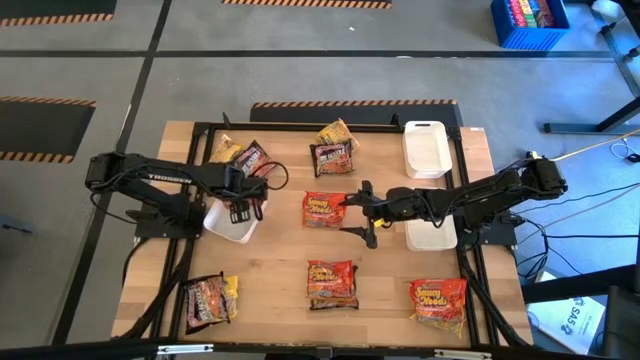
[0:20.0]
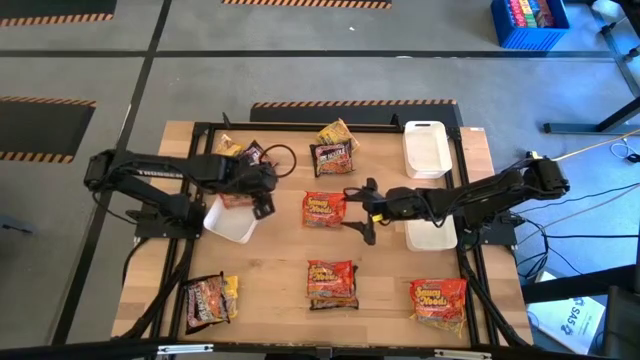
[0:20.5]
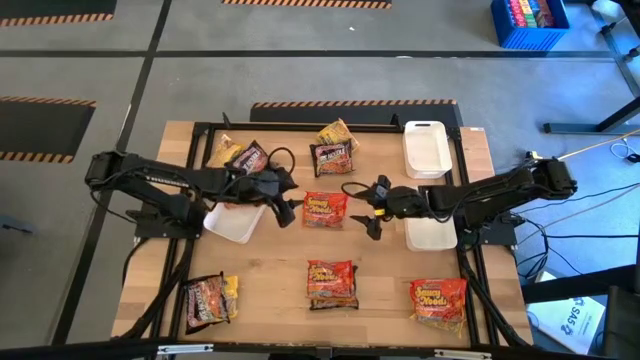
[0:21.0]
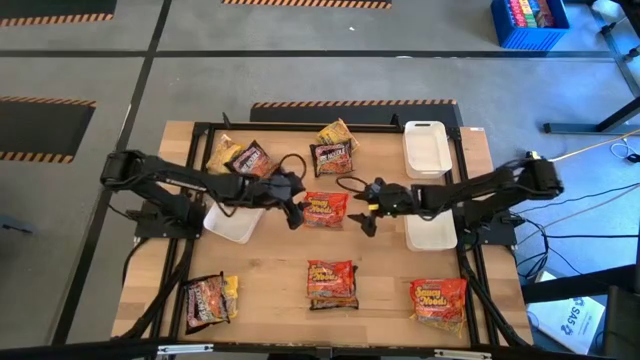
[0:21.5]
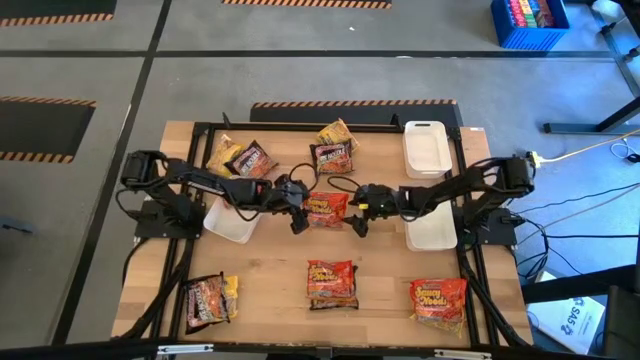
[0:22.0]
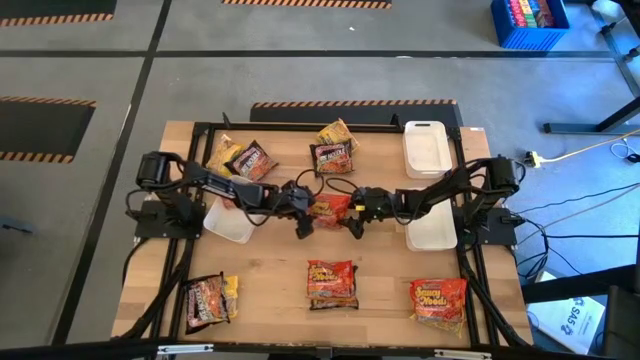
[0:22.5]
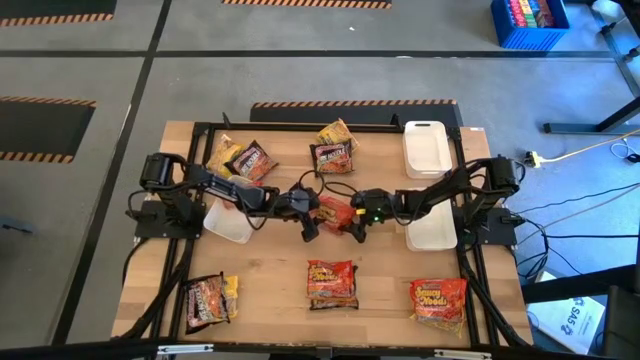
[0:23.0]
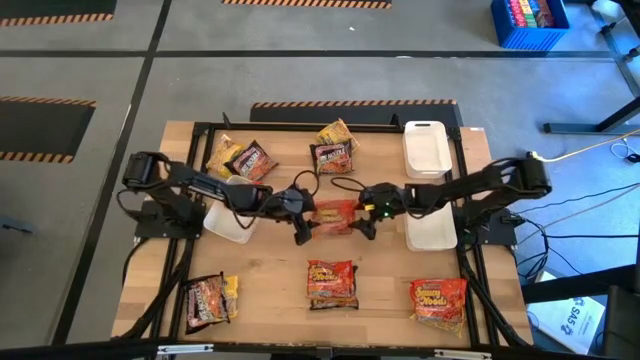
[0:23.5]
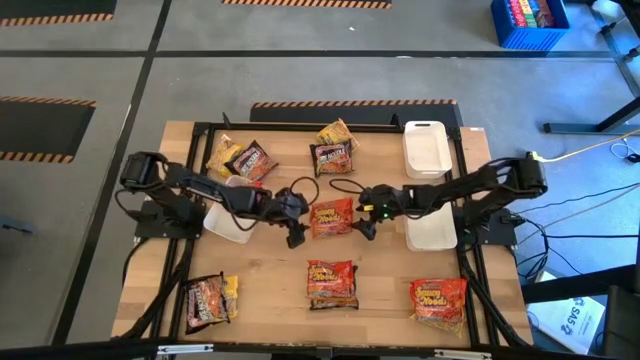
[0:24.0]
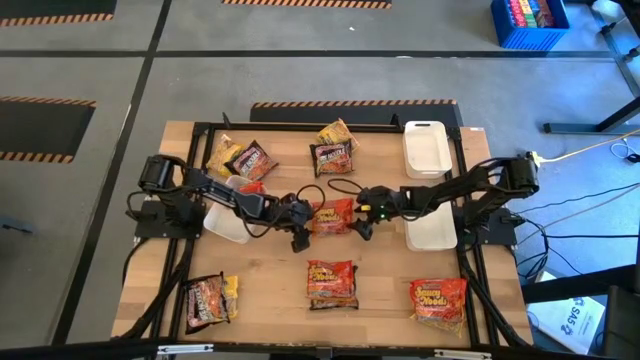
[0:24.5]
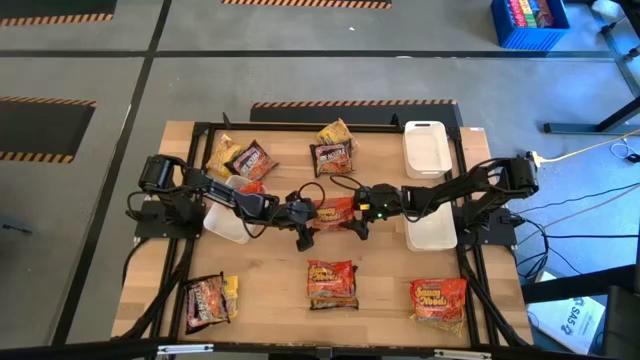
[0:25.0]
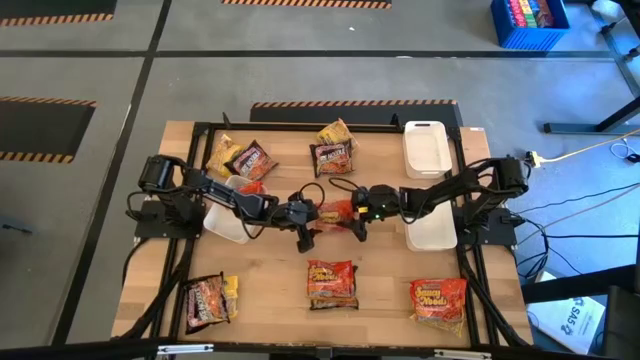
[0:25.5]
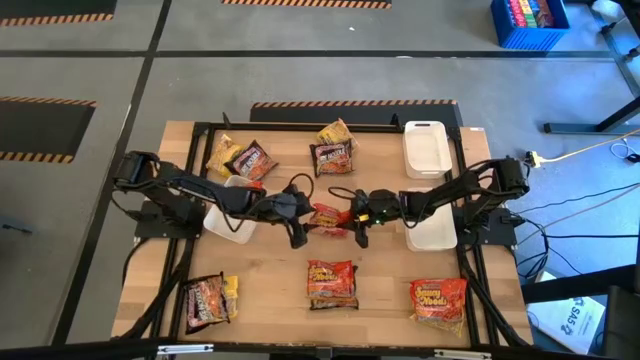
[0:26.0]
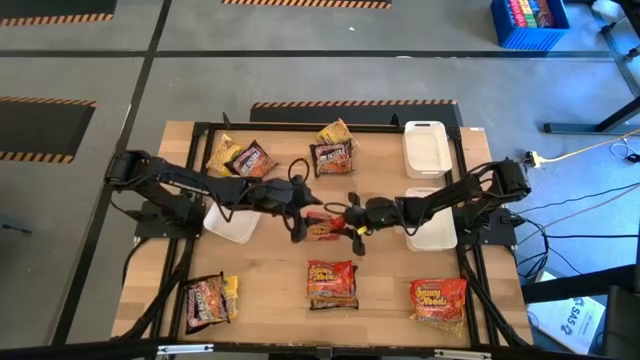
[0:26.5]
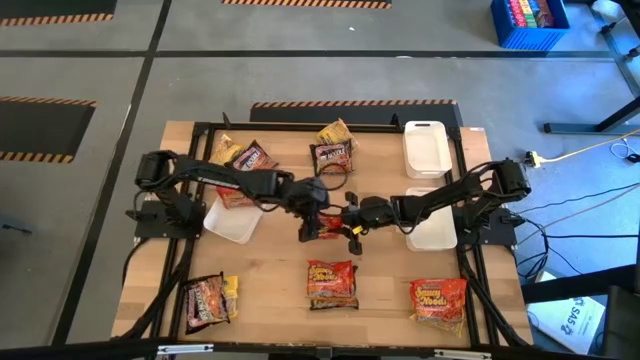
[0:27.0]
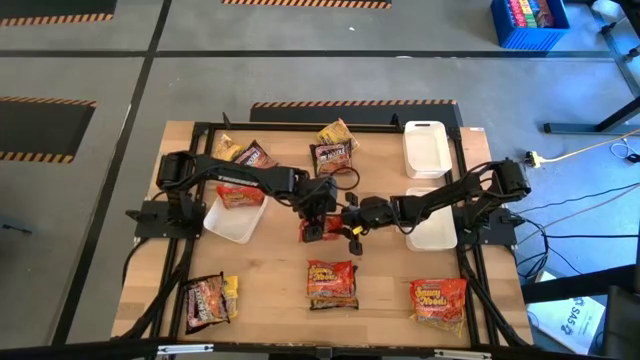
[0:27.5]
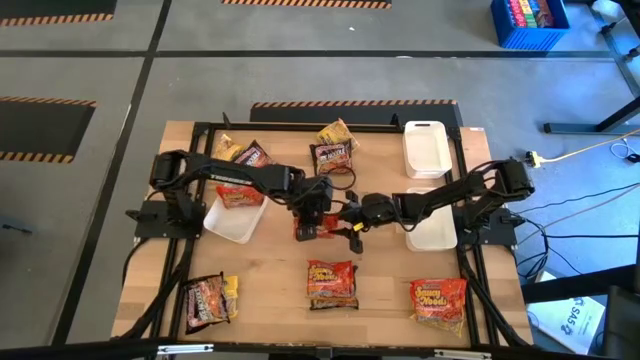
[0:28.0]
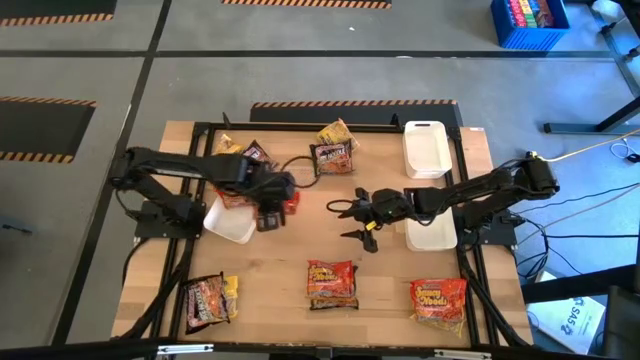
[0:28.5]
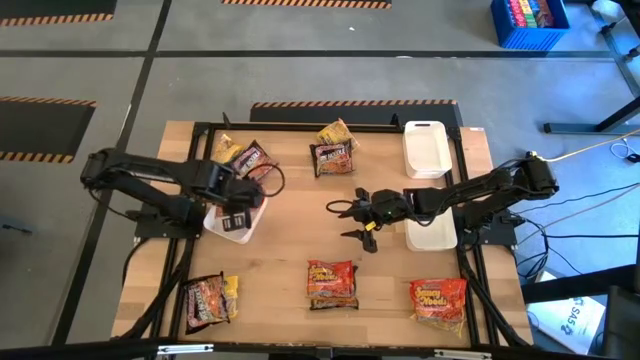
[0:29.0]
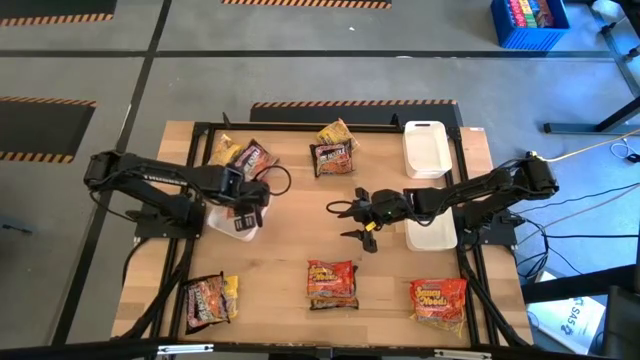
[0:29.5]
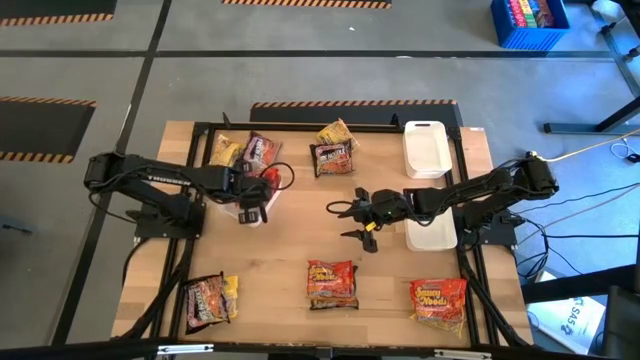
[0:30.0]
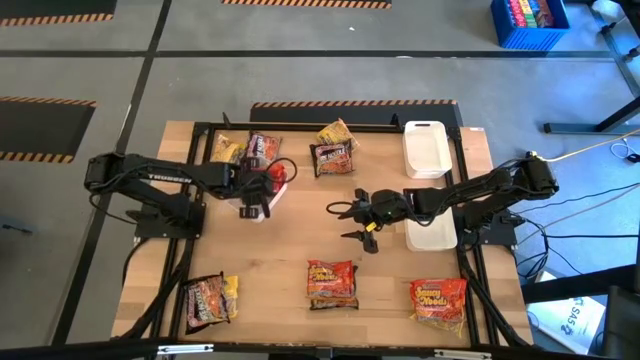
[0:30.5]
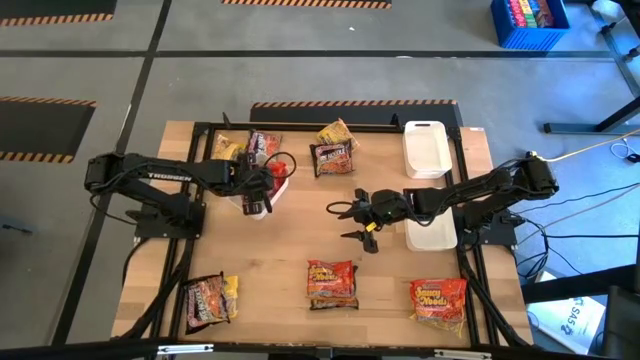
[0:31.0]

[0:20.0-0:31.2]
Task: Sort Maruchan noodles
Put the top orange noodle into the left white bin

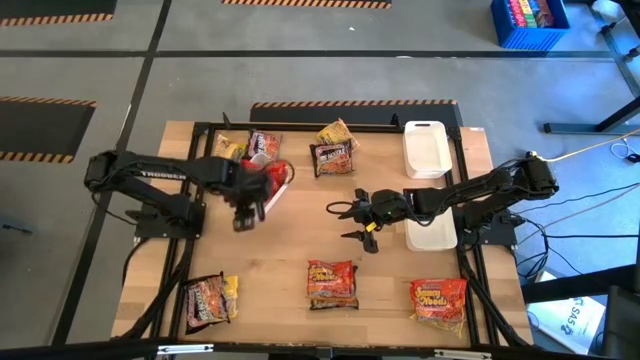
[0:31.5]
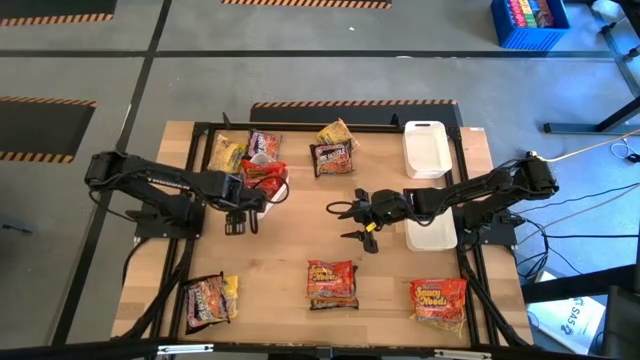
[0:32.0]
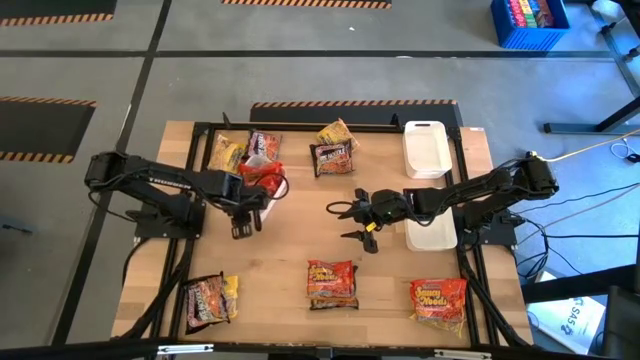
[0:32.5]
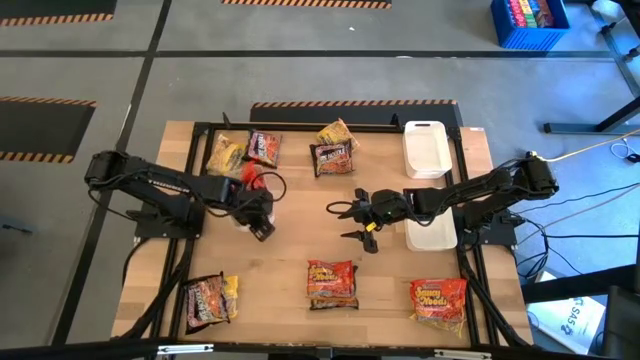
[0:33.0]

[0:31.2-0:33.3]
Adjust the left white bin

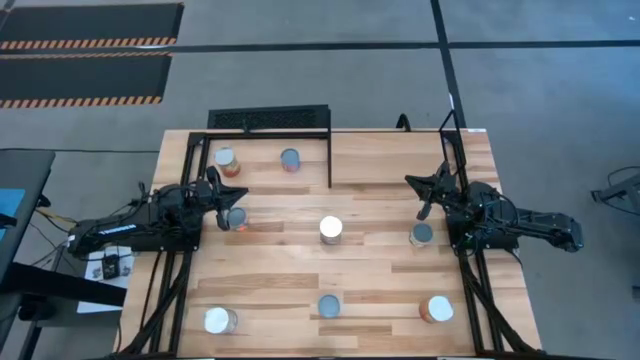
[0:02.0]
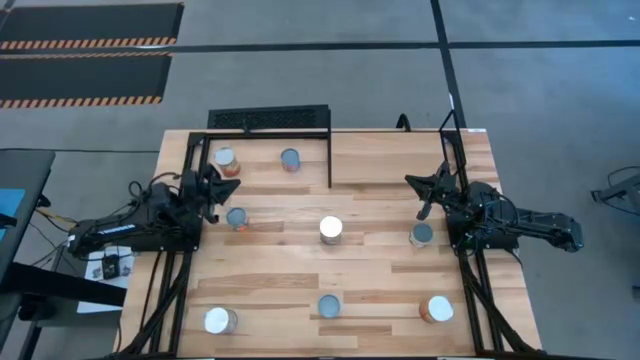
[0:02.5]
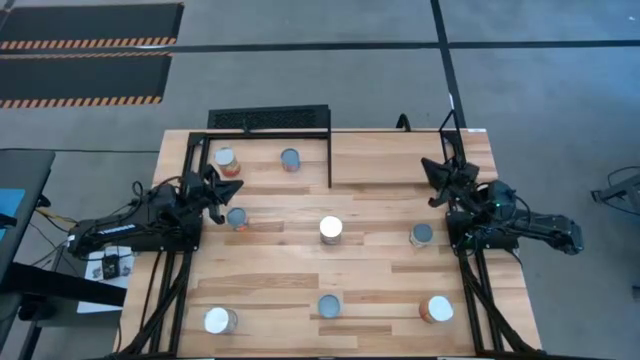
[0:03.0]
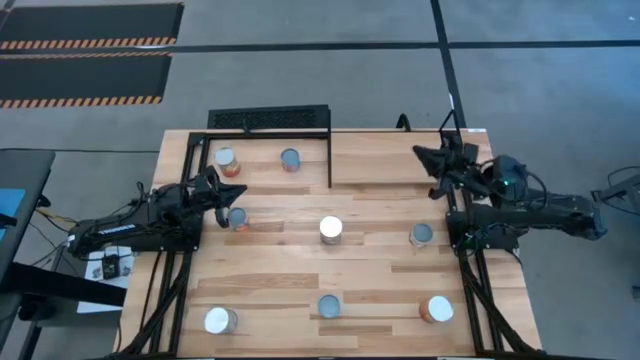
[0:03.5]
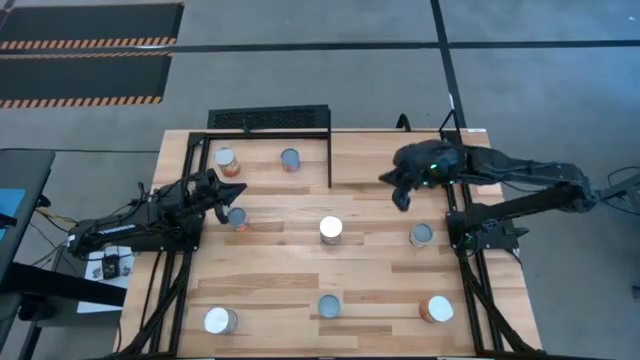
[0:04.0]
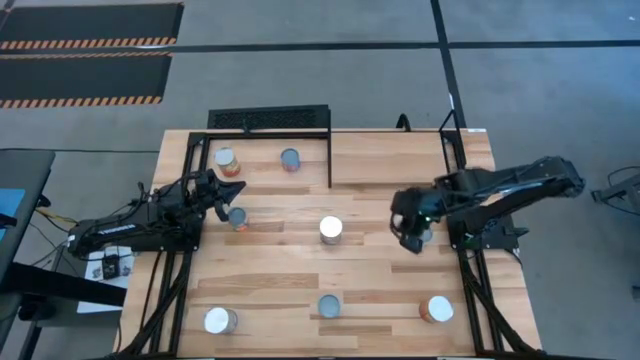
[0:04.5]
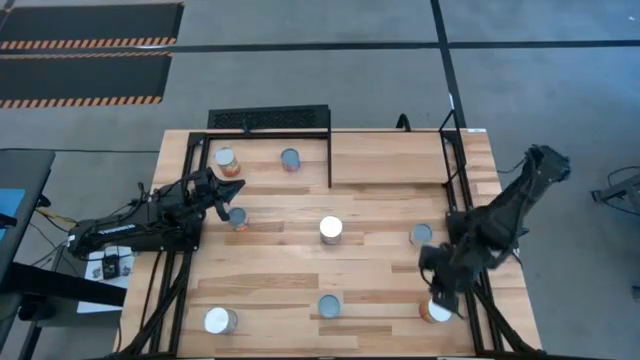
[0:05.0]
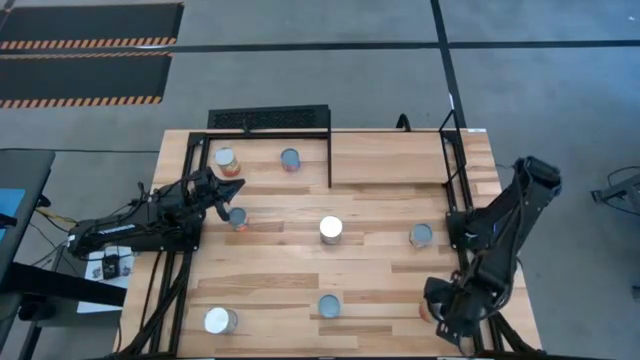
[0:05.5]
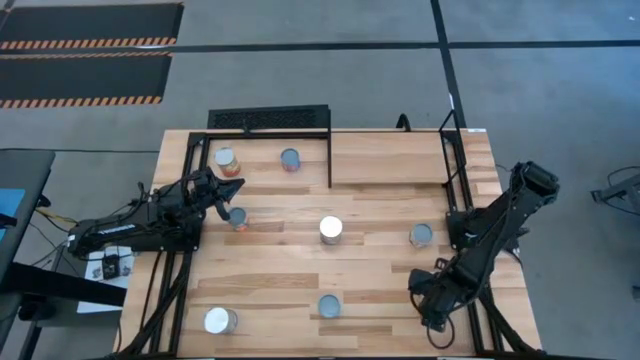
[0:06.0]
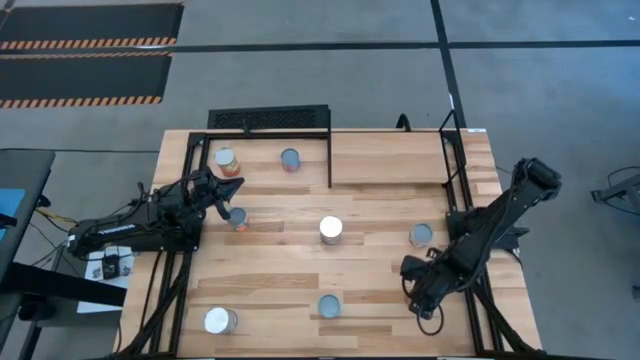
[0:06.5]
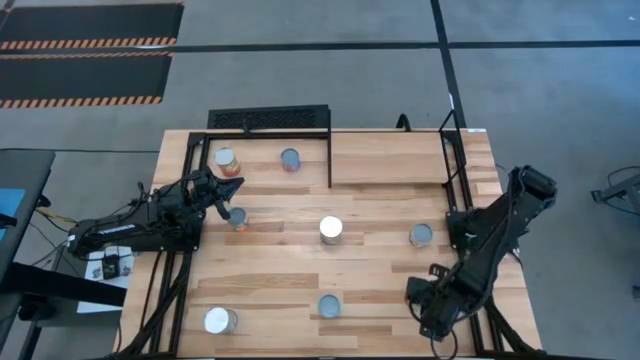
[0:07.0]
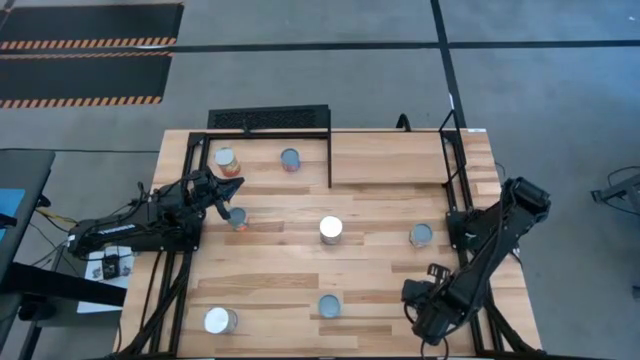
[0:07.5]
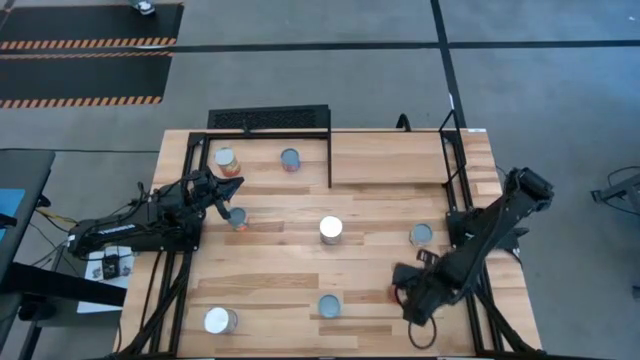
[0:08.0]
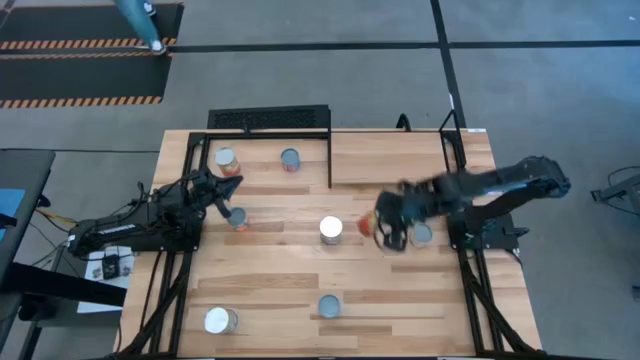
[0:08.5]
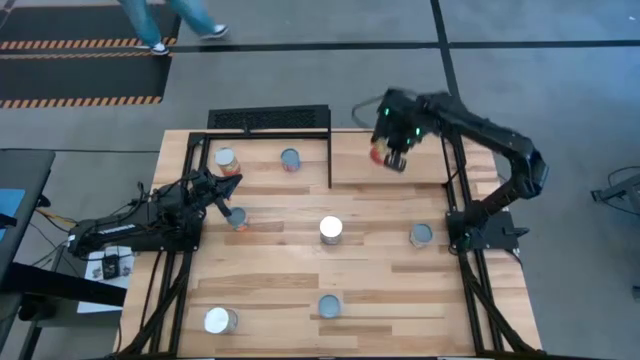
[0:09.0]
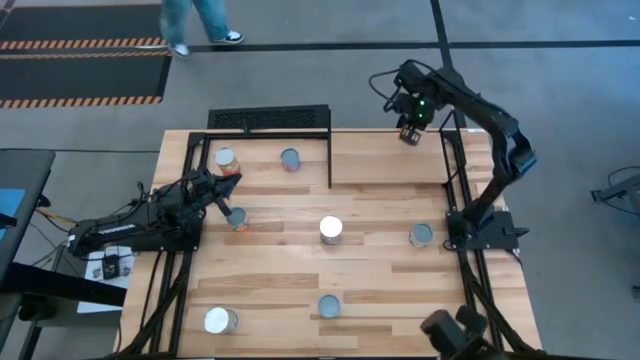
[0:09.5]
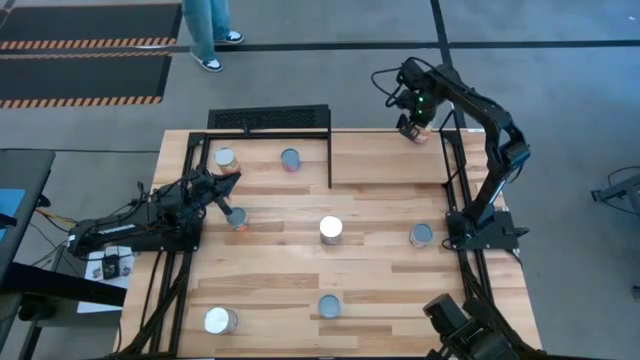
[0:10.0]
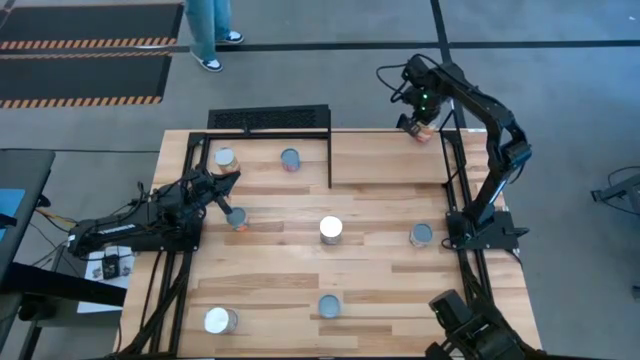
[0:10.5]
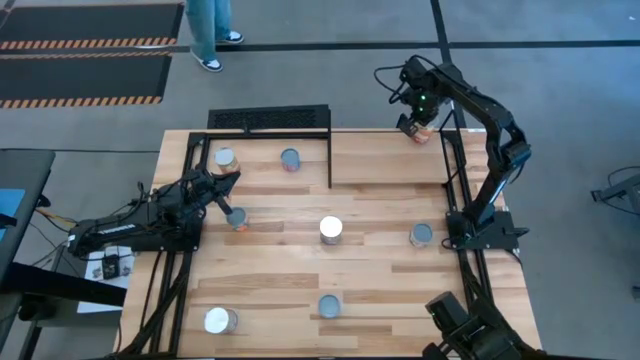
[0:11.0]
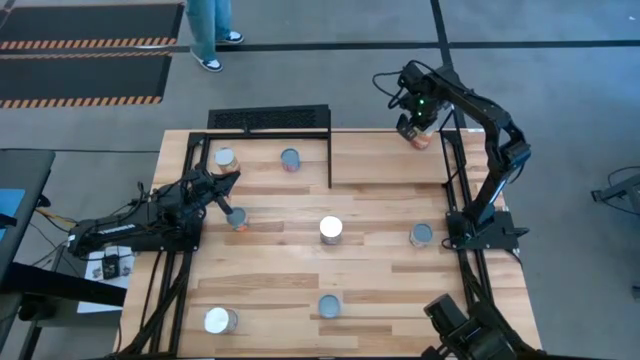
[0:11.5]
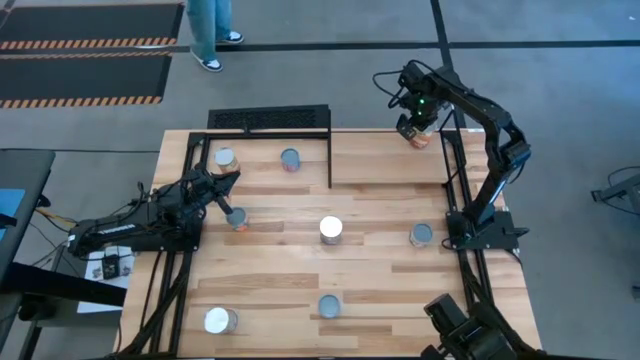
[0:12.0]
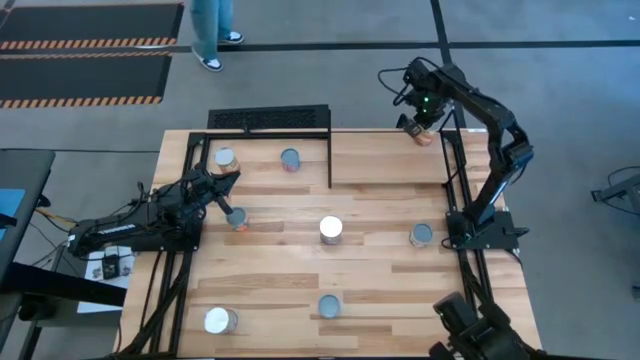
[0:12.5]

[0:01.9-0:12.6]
Task: Pick and place cans onto a shelf
Put the bottom orange canned corn on the shelf
